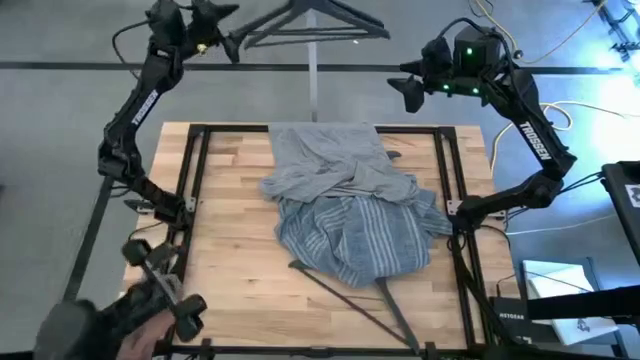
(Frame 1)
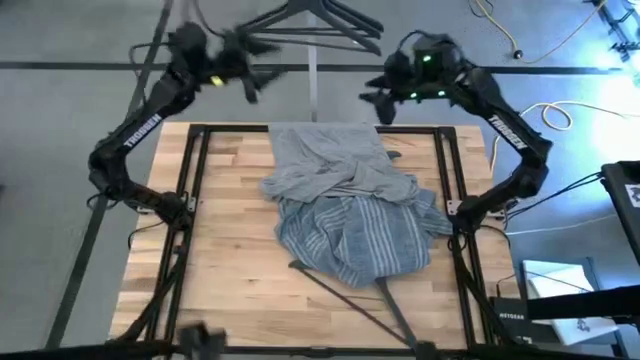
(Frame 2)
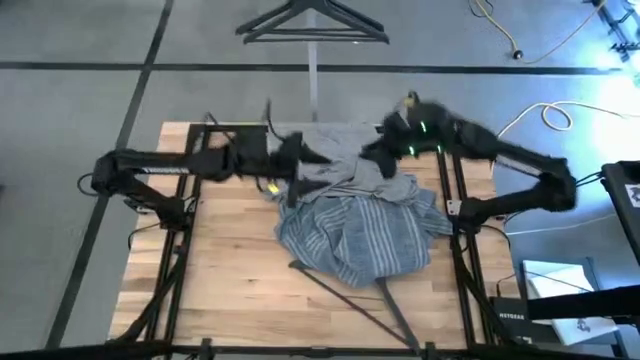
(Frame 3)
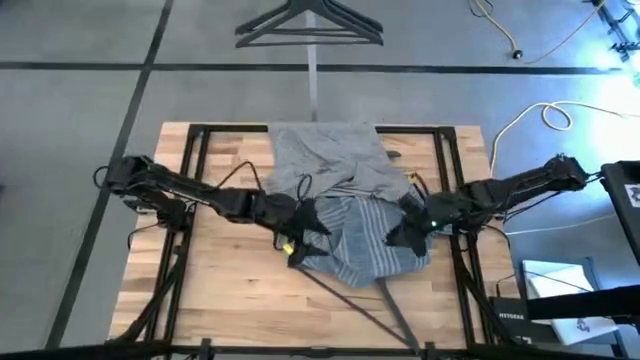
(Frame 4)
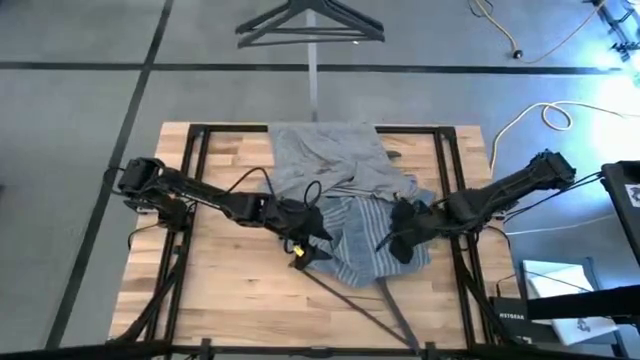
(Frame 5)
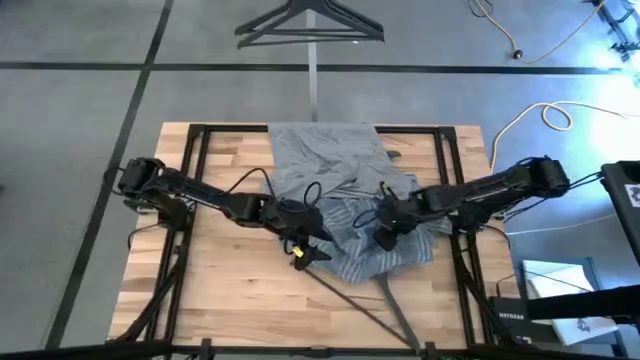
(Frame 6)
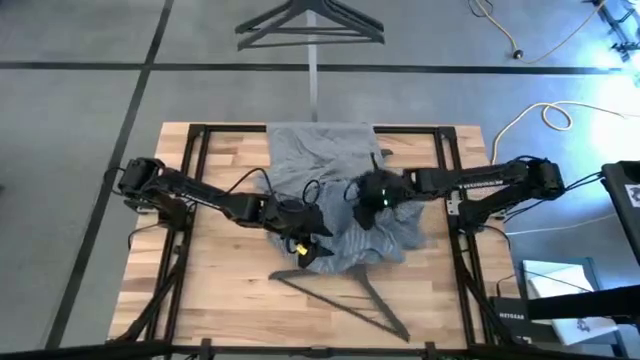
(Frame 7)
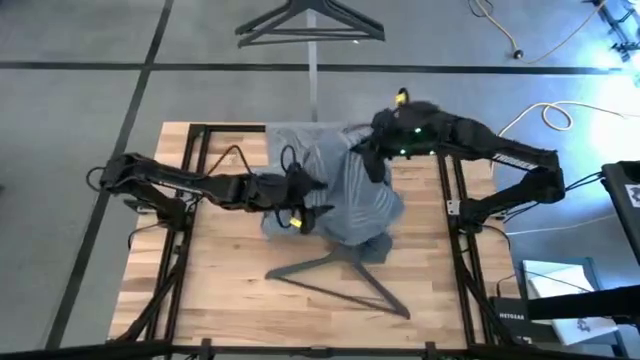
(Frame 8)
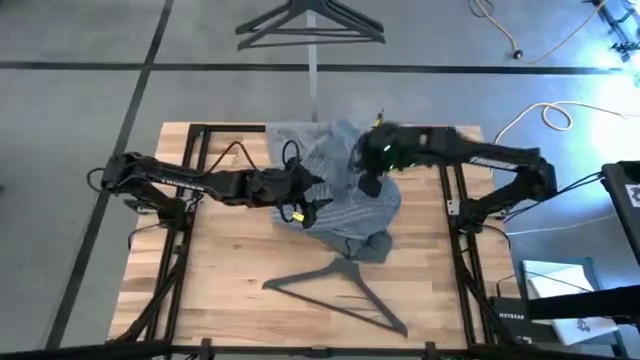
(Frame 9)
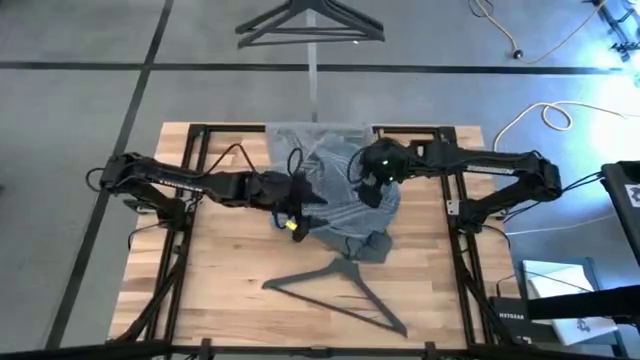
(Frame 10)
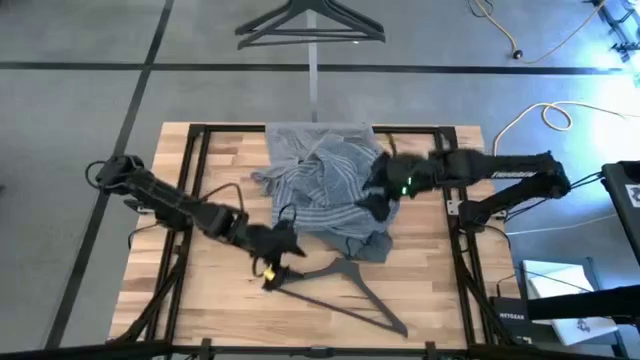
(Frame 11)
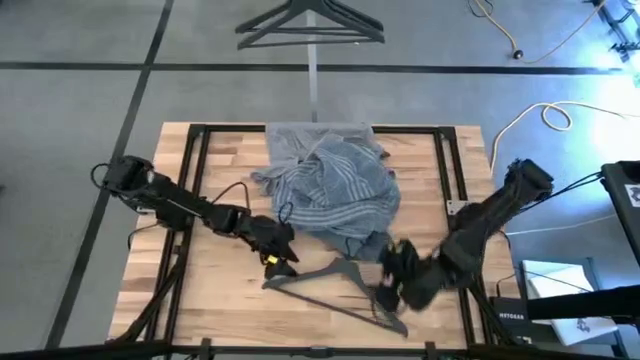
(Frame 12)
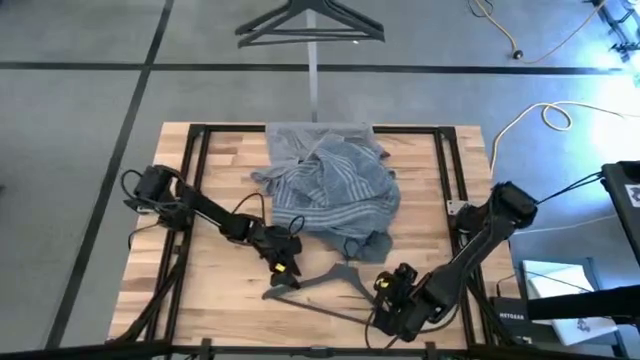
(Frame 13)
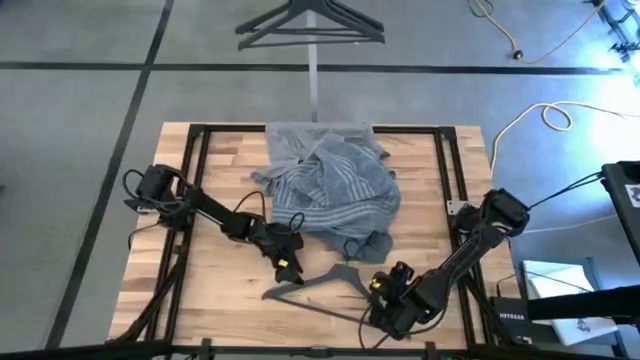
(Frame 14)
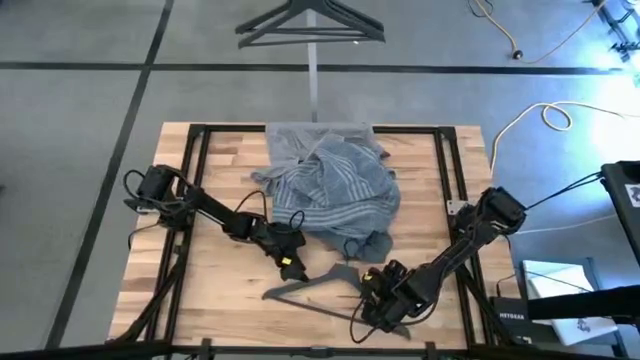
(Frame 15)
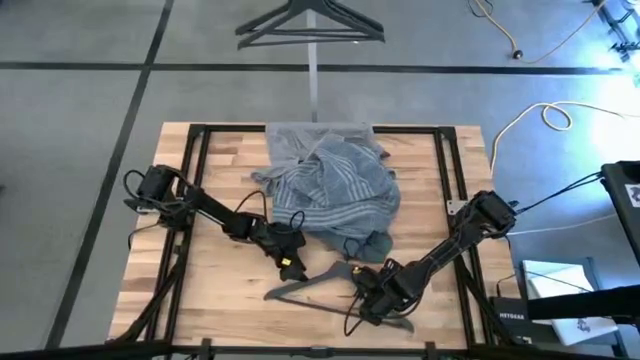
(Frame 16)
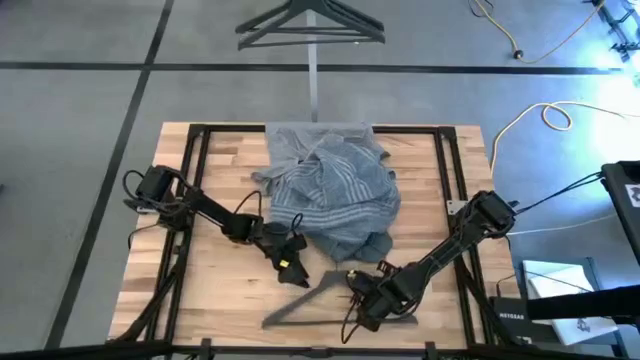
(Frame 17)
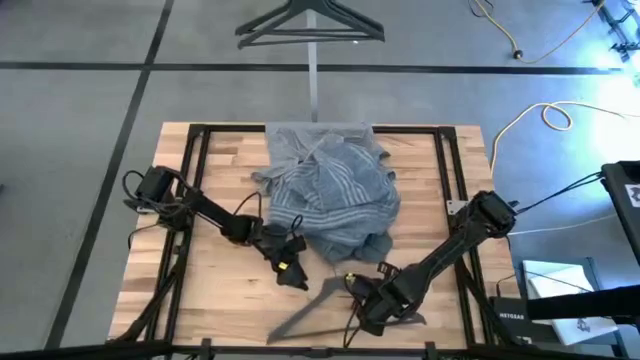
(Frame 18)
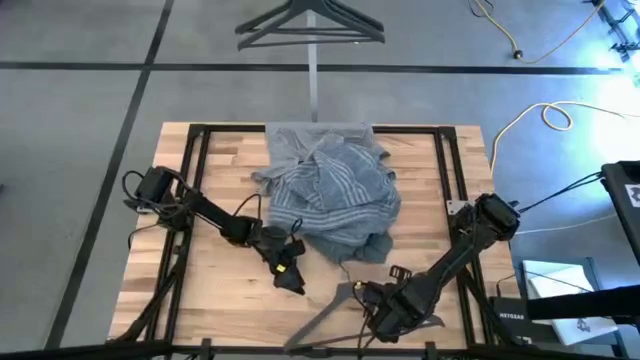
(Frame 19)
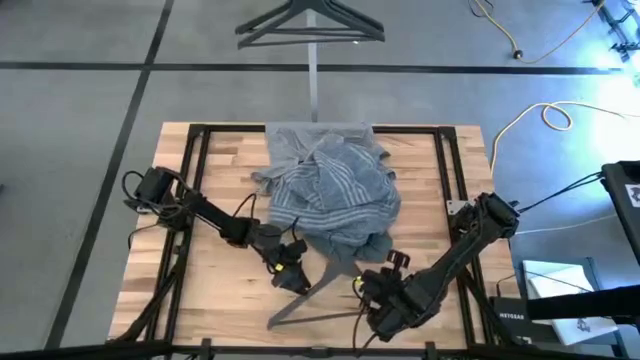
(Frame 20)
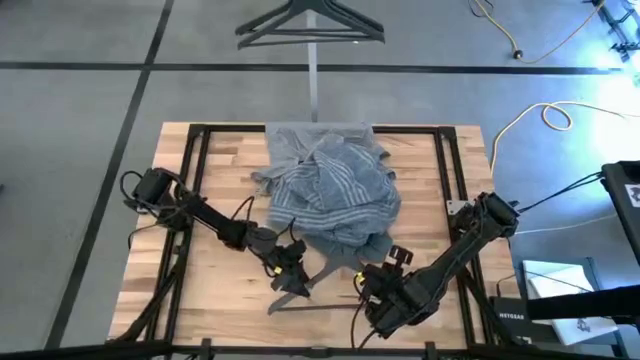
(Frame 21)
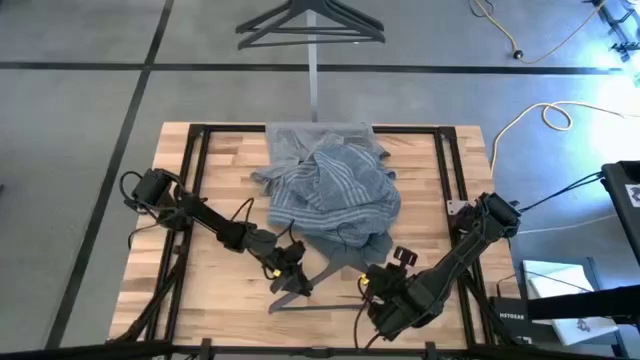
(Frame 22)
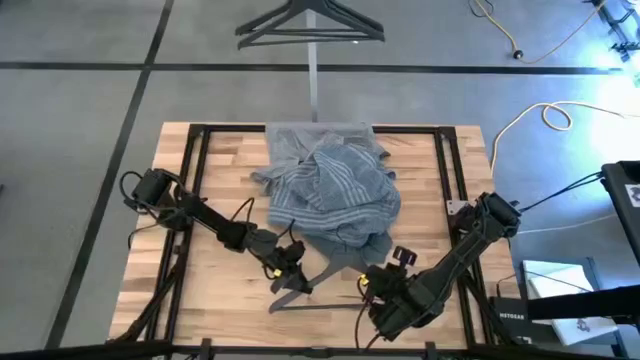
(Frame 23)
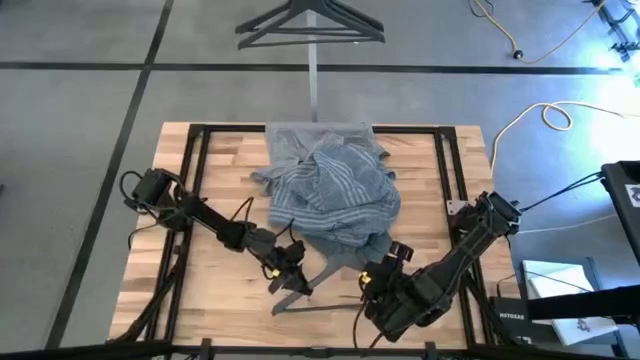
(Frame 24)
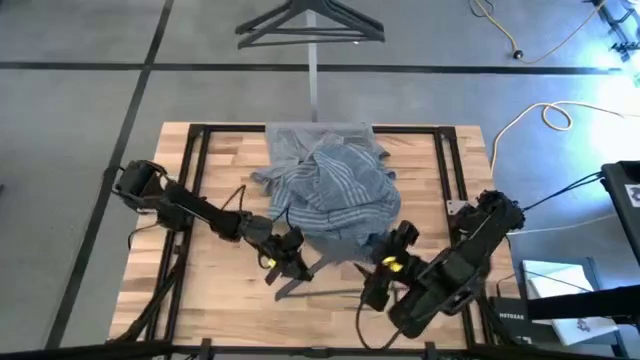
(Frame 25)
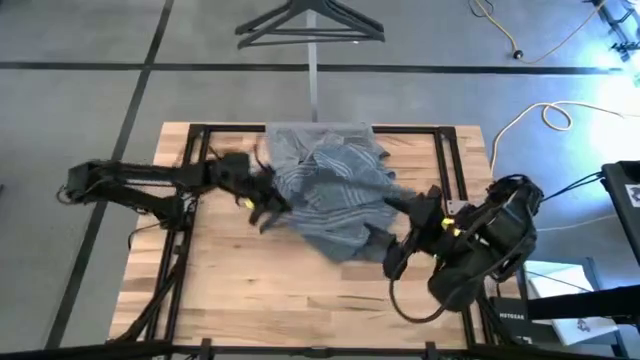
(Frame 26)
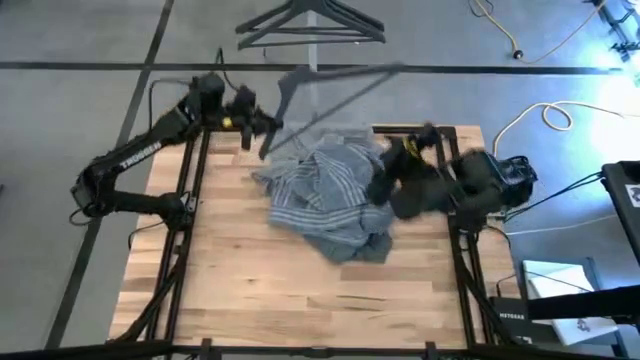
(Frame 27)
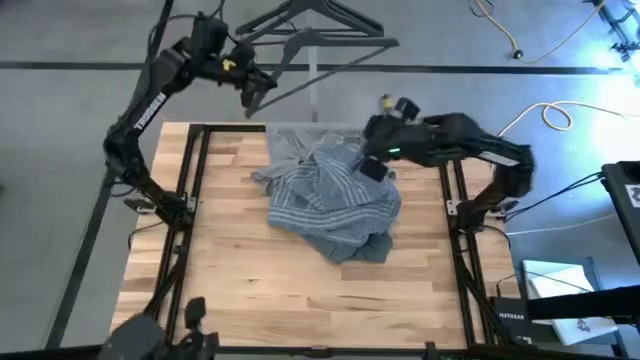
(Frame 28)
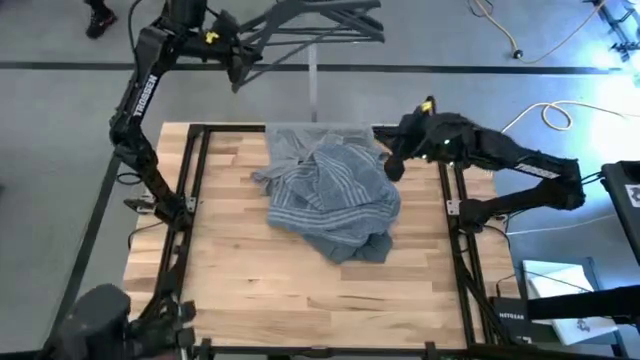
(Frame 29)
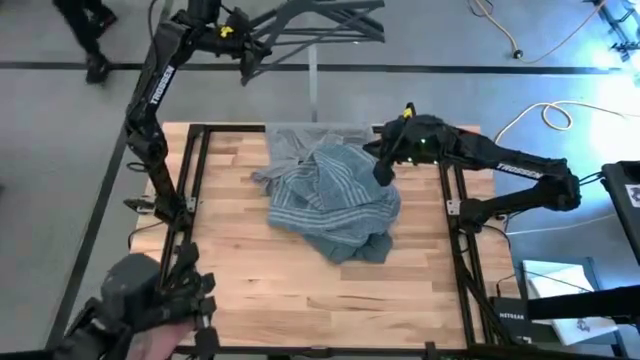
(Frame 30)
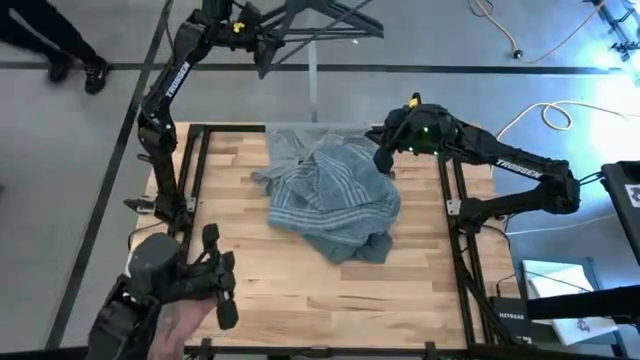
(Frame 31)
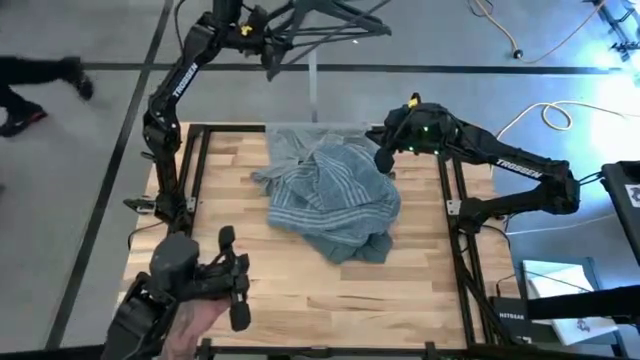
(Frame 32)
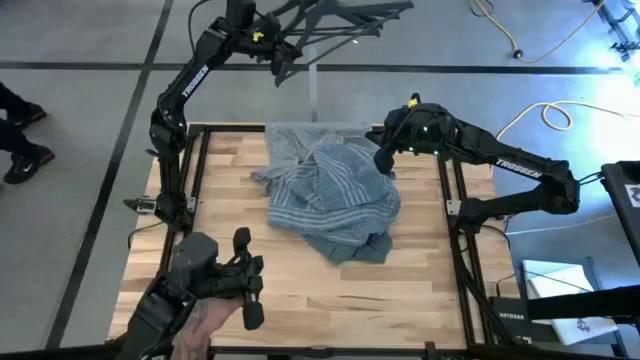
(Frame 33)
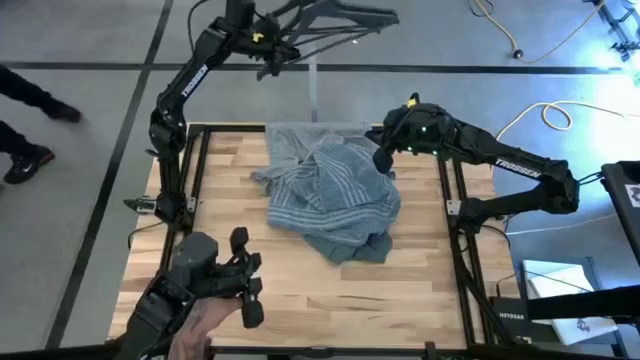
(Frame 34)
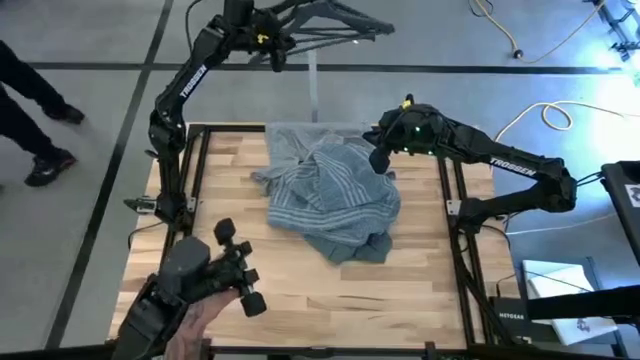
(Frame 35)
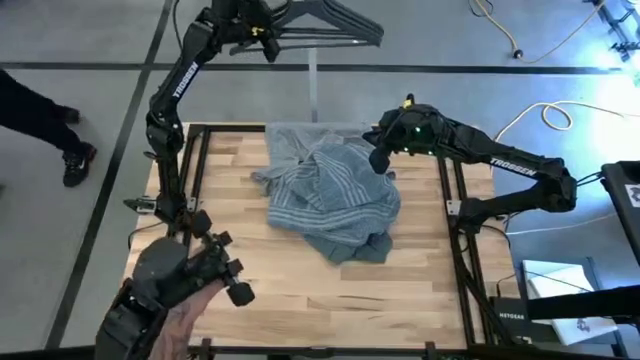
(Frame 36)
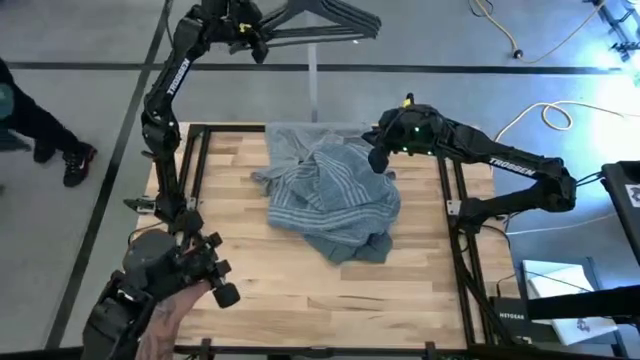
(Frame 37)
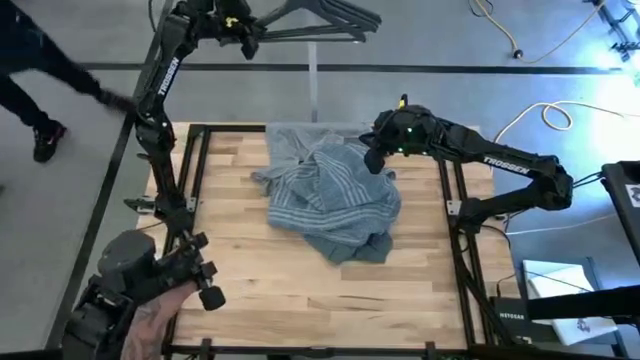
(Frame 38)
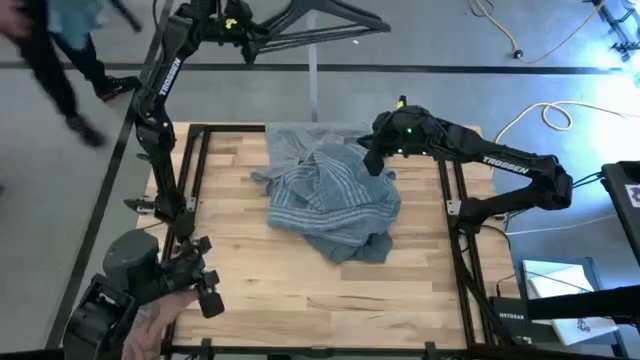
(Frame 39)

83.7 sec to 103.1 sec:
Task: Unhang clothes
Hang the hanger
